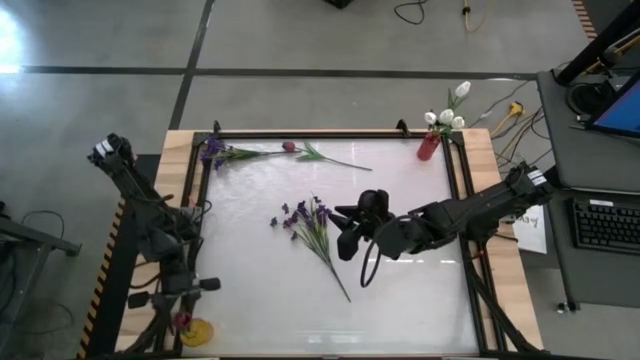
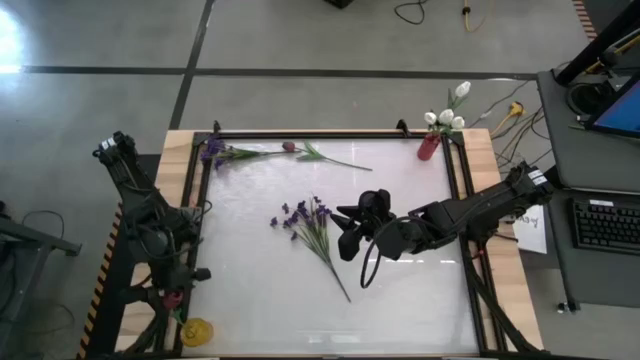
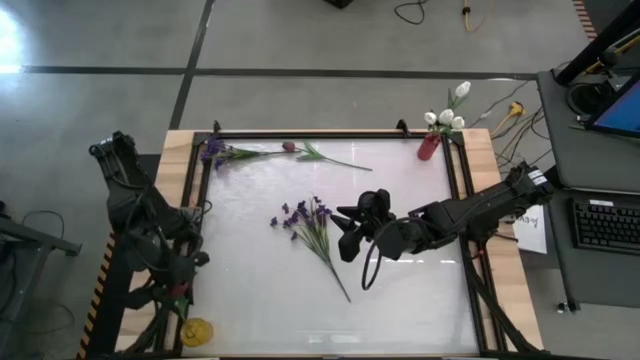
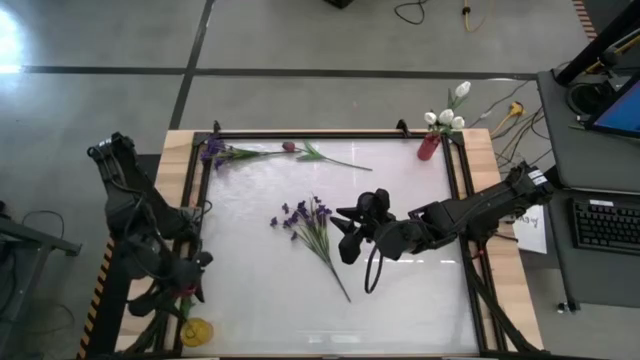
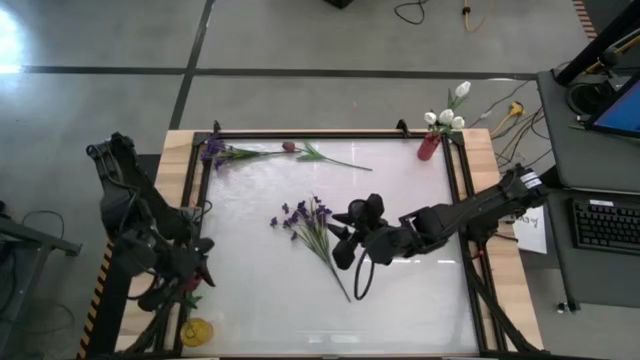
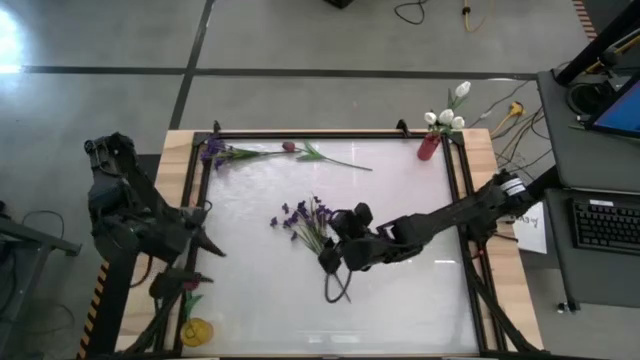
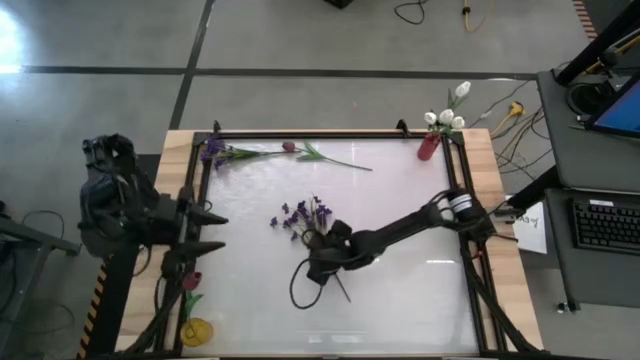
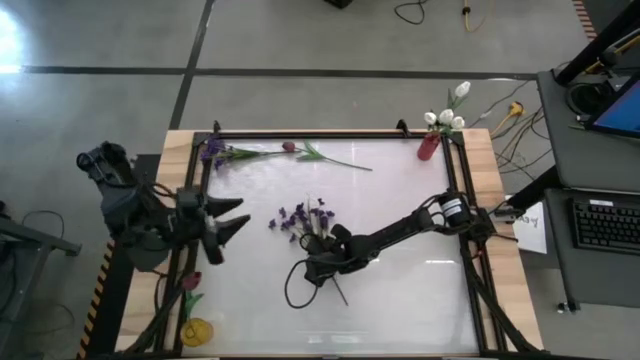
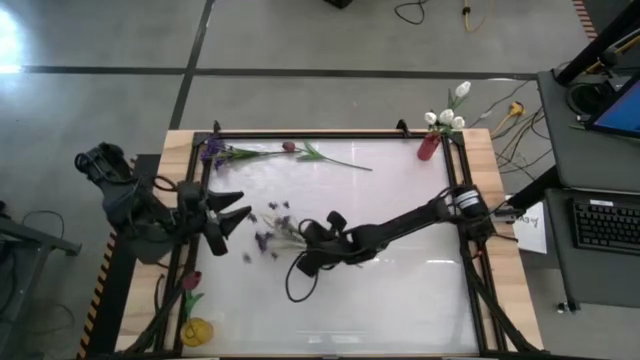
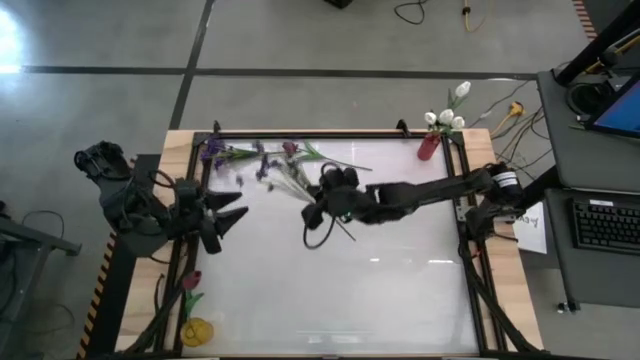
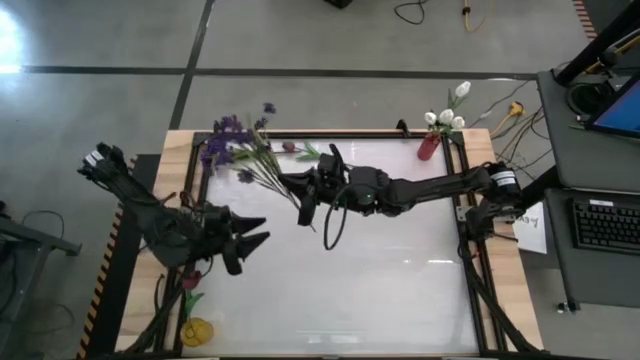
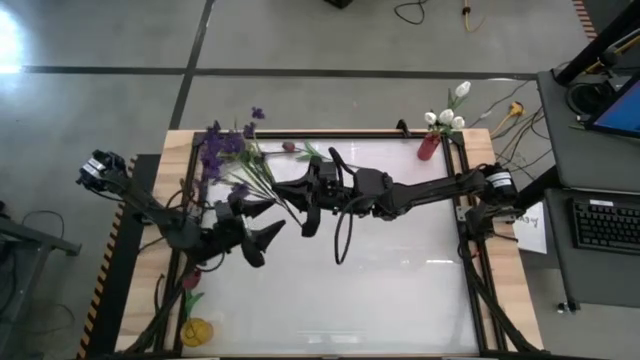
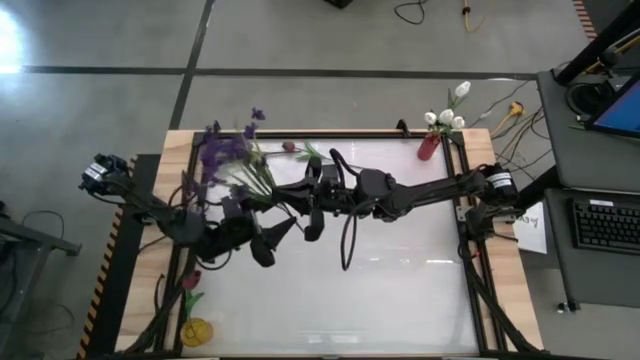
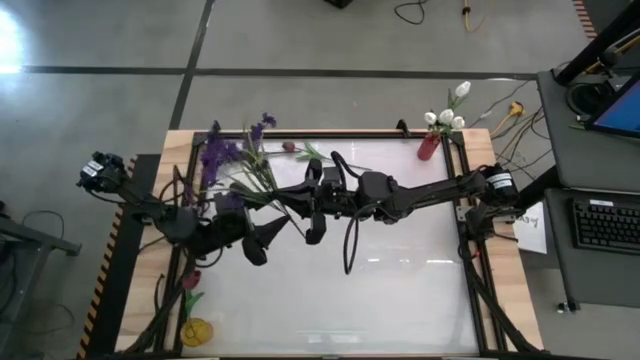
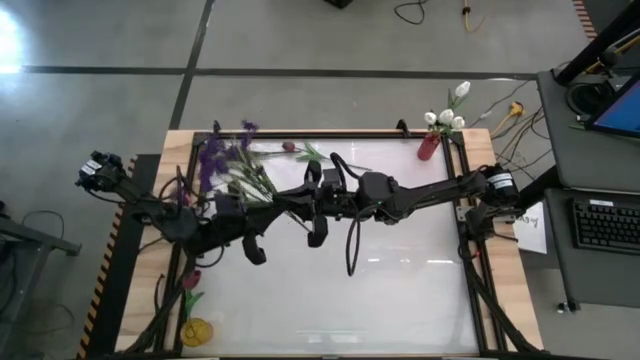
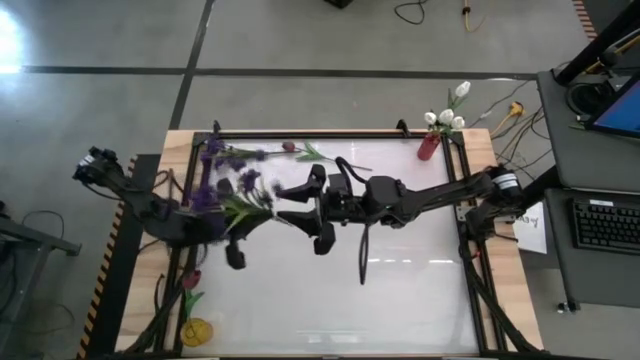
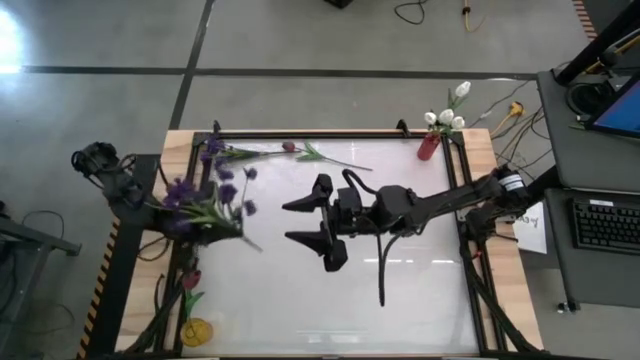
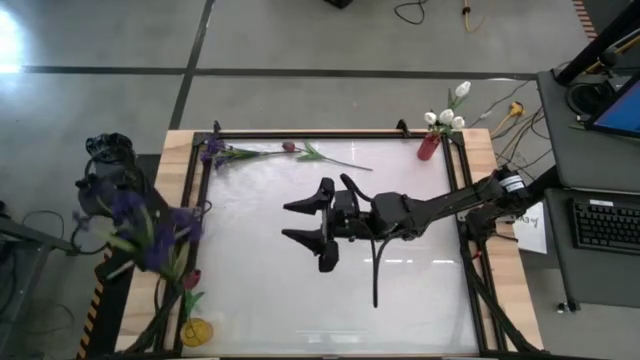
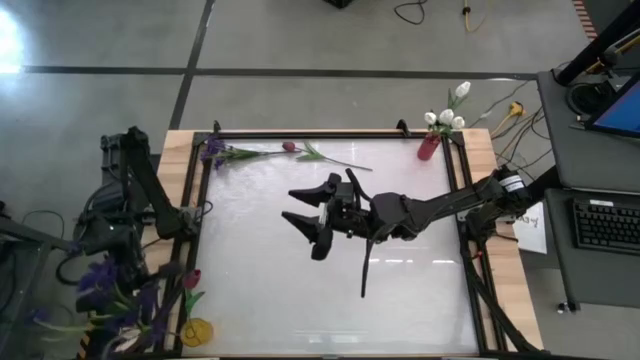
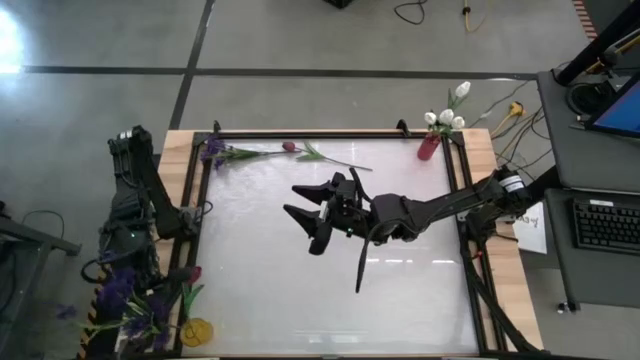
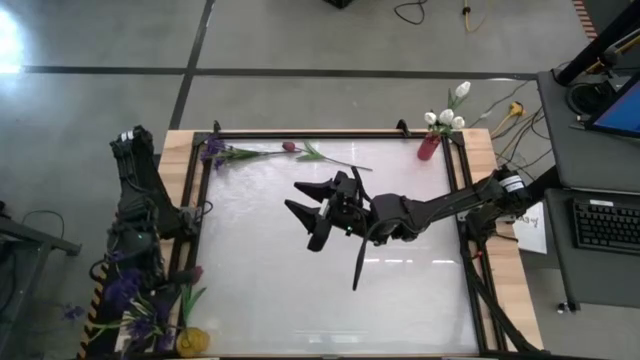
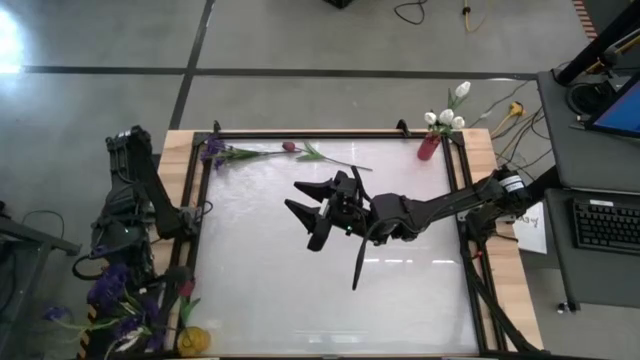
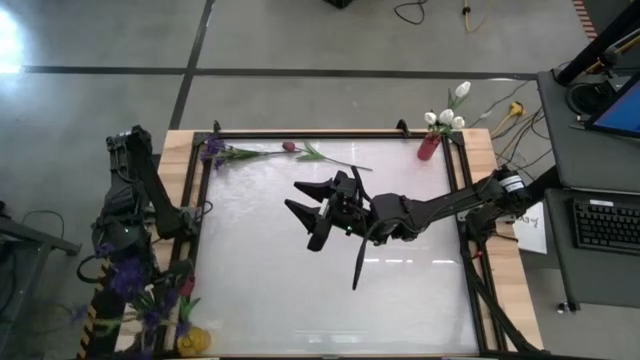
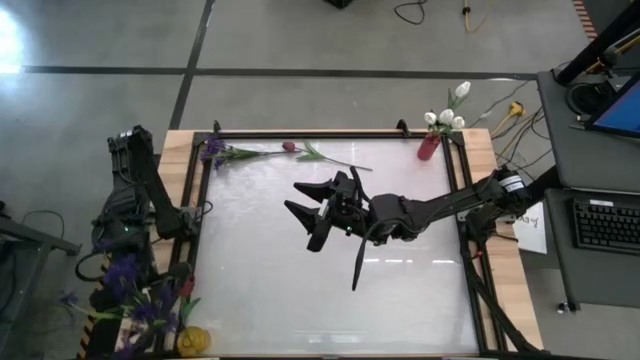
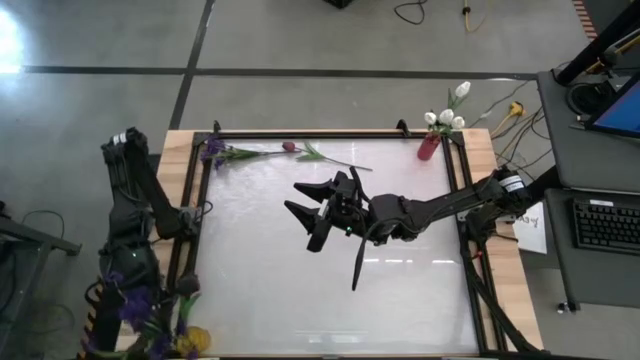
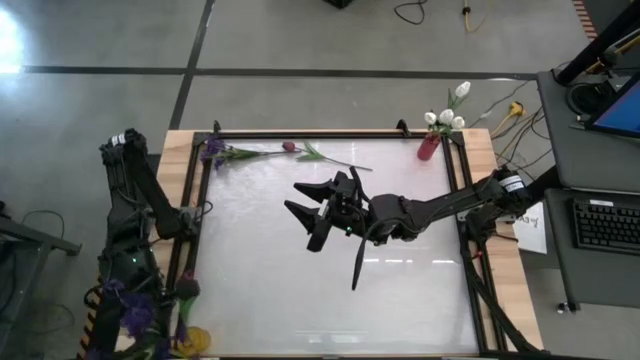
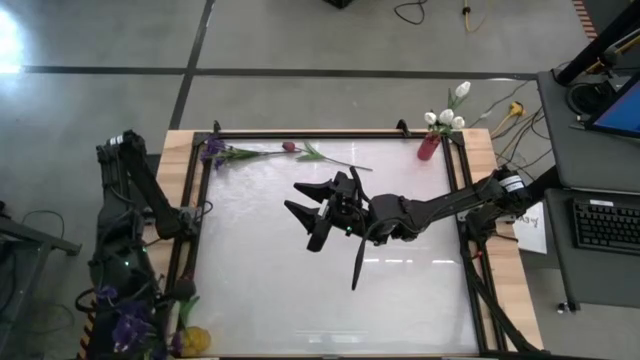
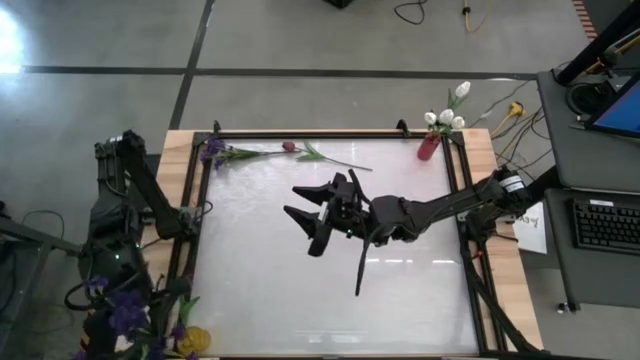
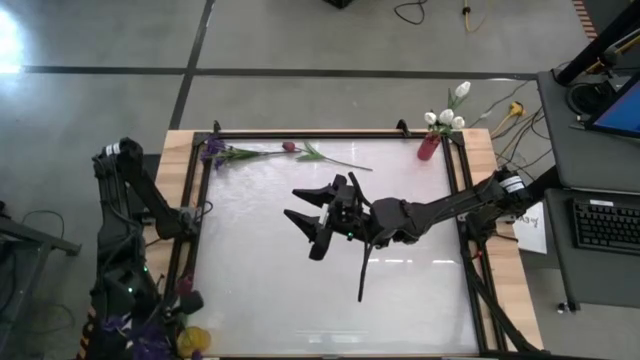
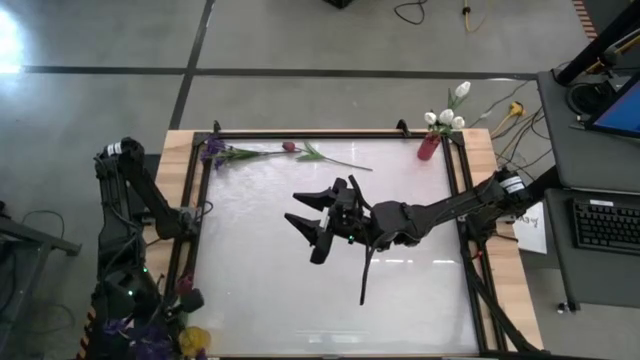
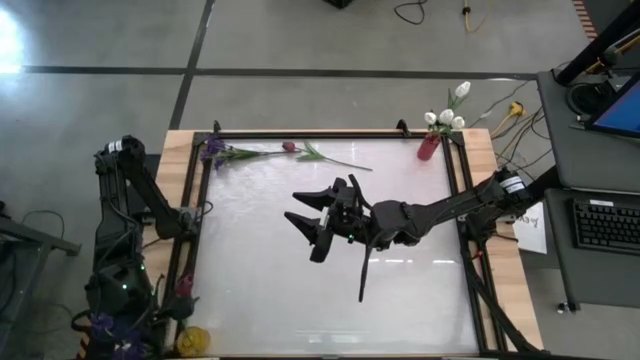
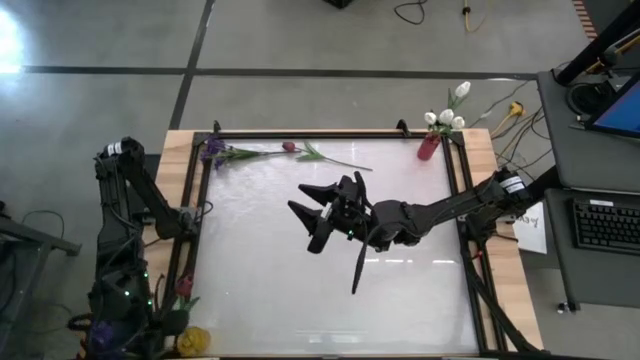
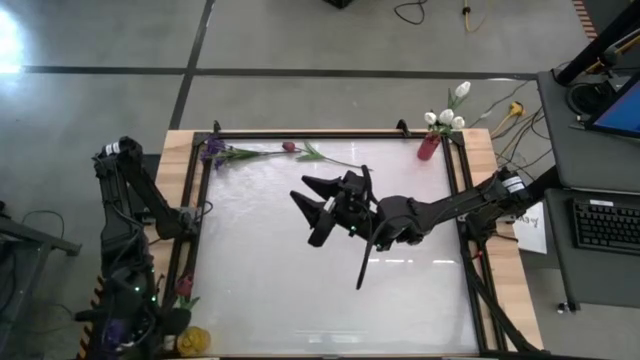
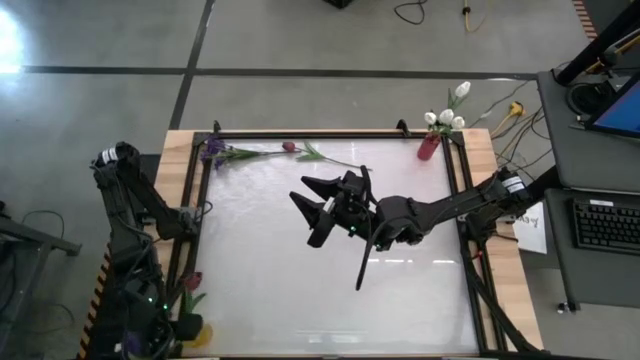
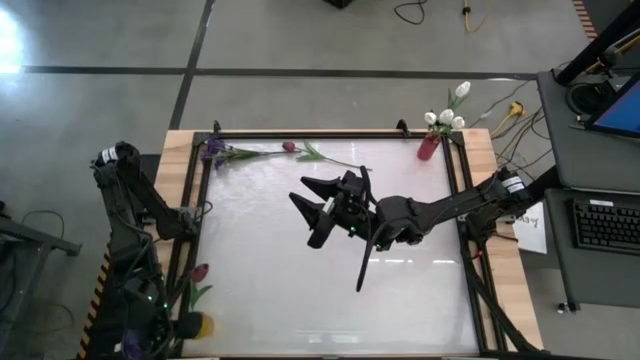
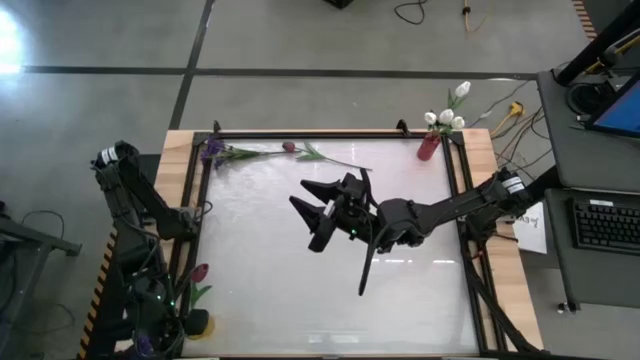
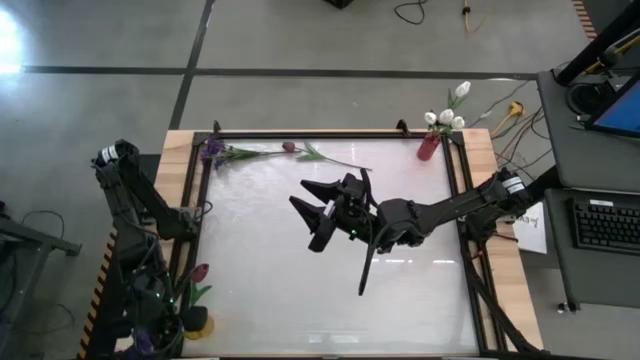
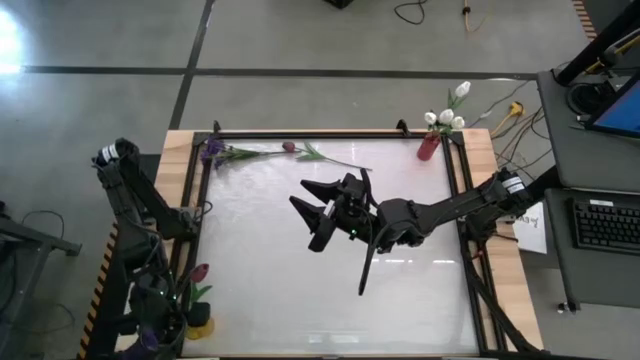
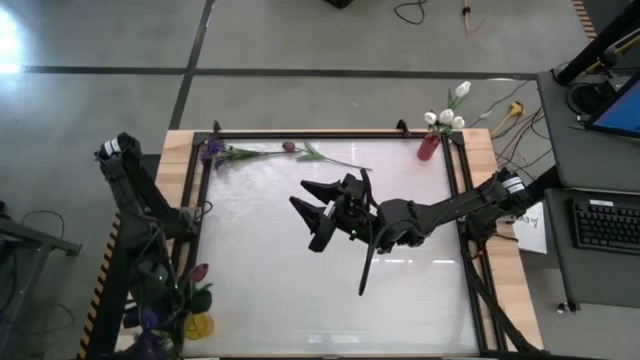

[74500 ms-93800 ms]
Task: Sort flowers into vase by color
Put the middle purple flowers into the yellow flower vase
